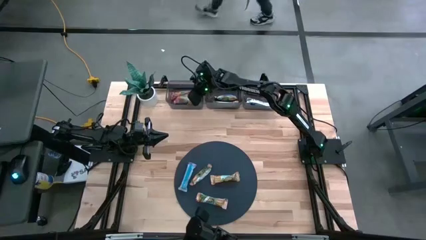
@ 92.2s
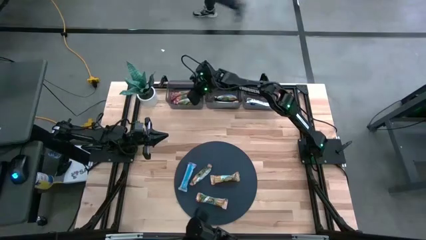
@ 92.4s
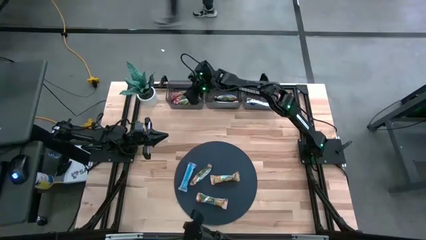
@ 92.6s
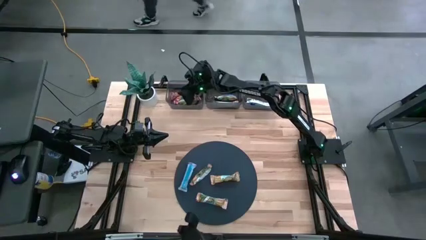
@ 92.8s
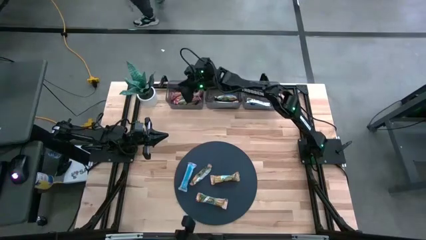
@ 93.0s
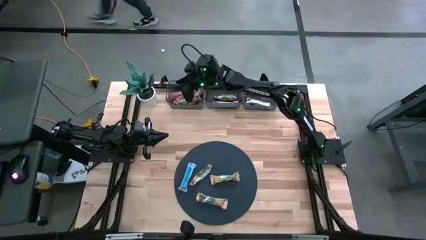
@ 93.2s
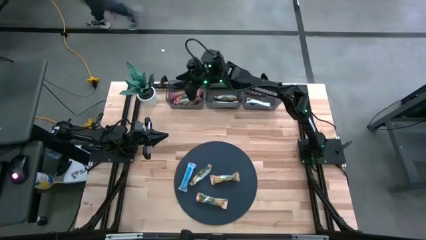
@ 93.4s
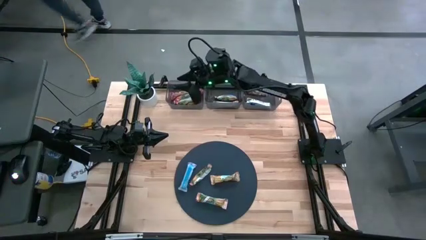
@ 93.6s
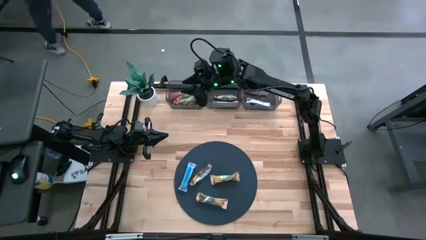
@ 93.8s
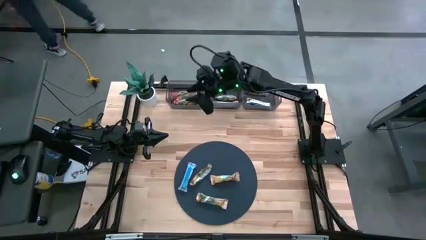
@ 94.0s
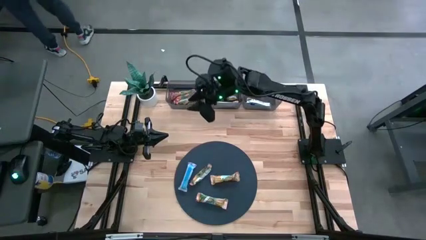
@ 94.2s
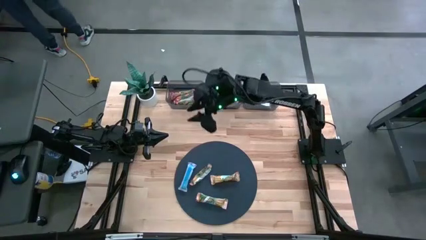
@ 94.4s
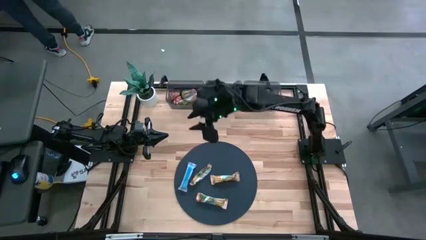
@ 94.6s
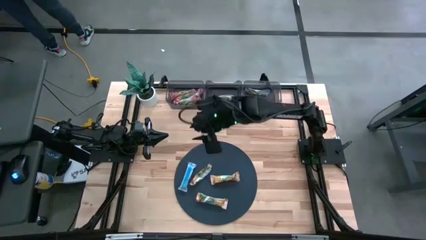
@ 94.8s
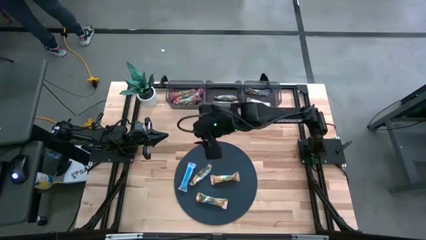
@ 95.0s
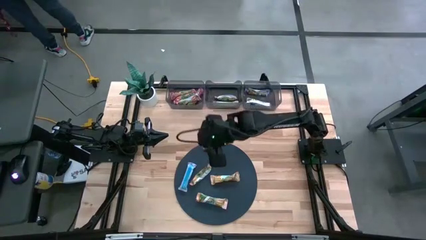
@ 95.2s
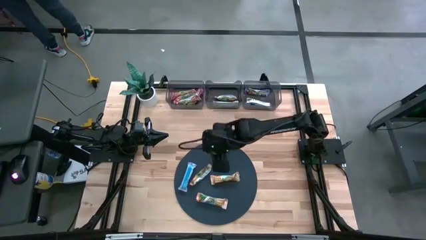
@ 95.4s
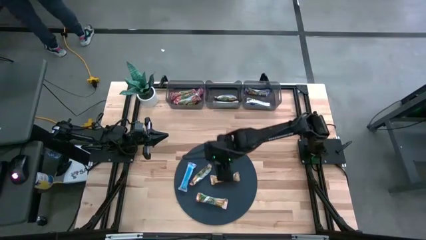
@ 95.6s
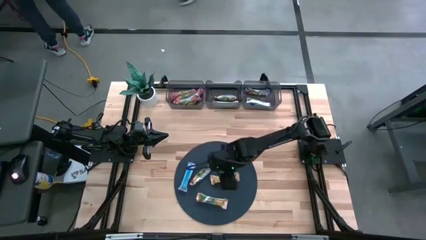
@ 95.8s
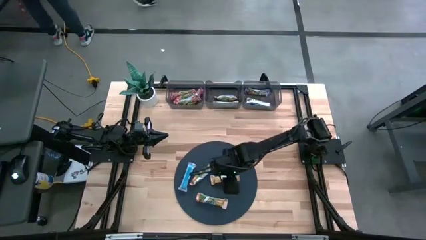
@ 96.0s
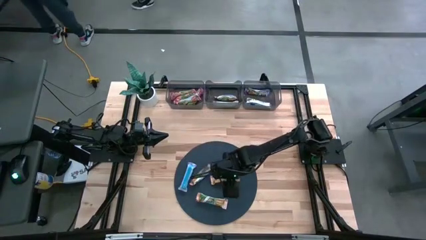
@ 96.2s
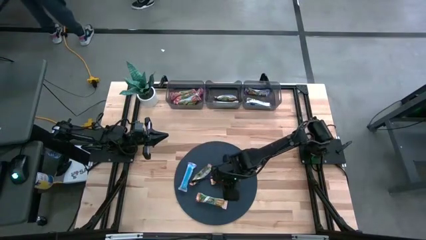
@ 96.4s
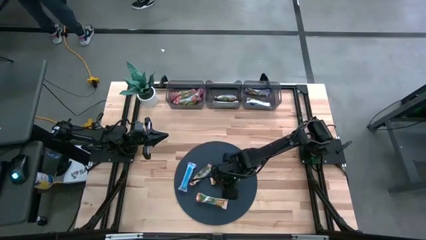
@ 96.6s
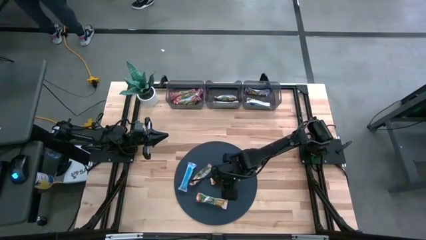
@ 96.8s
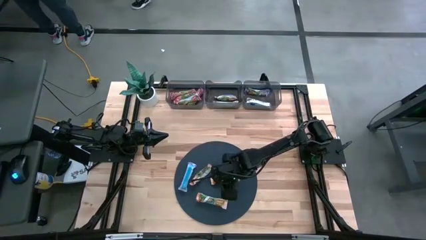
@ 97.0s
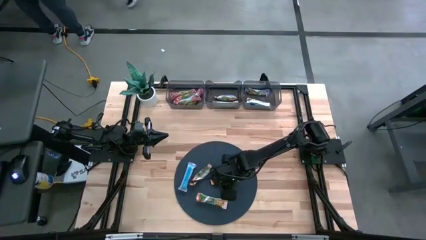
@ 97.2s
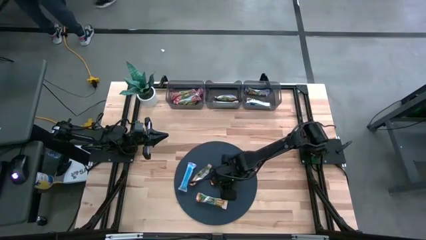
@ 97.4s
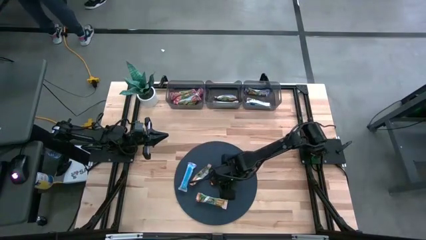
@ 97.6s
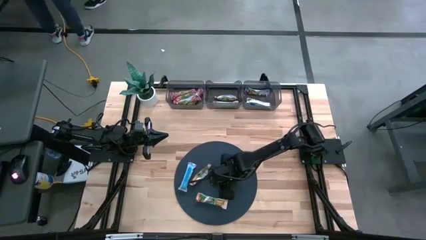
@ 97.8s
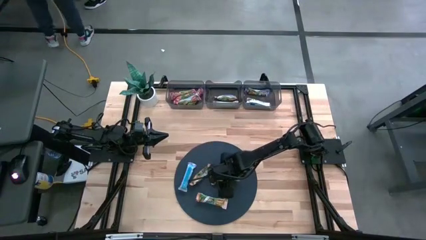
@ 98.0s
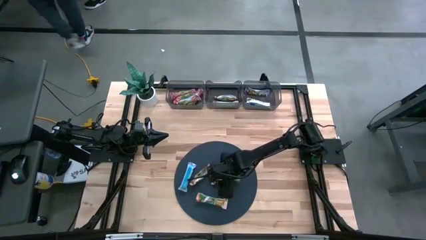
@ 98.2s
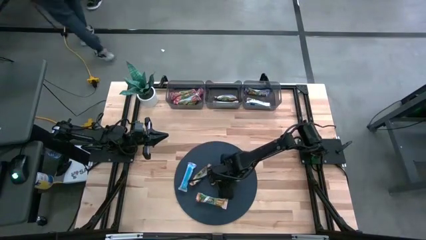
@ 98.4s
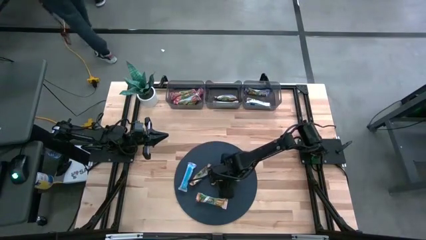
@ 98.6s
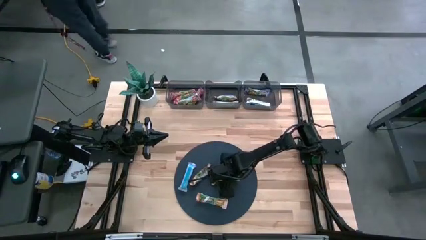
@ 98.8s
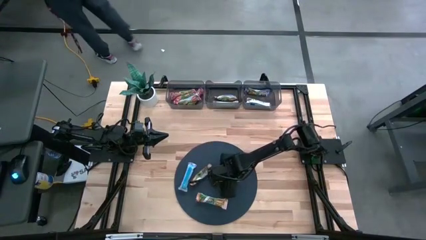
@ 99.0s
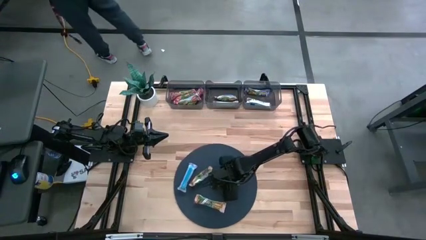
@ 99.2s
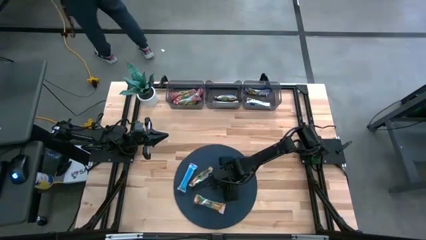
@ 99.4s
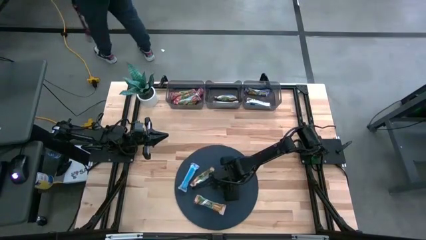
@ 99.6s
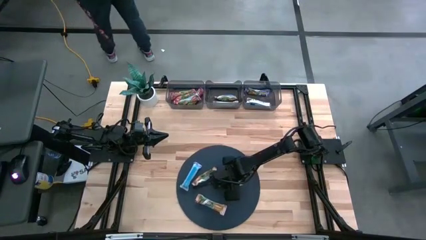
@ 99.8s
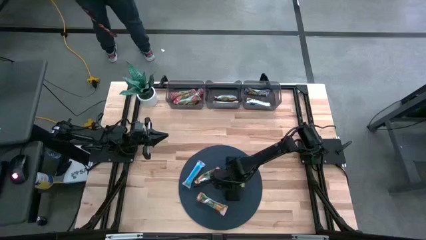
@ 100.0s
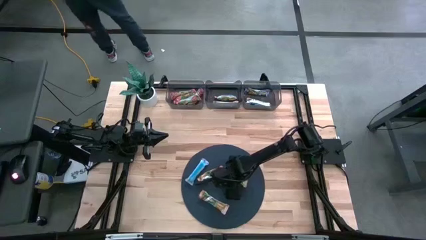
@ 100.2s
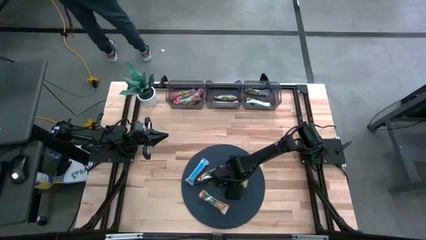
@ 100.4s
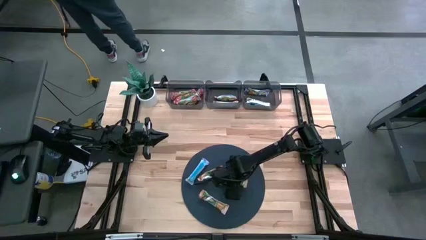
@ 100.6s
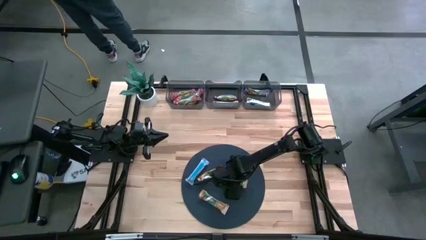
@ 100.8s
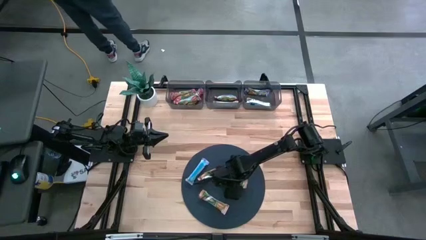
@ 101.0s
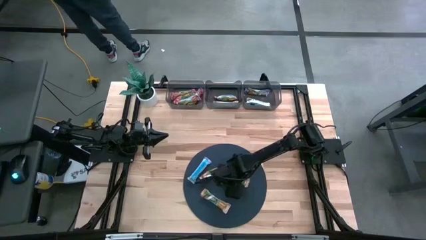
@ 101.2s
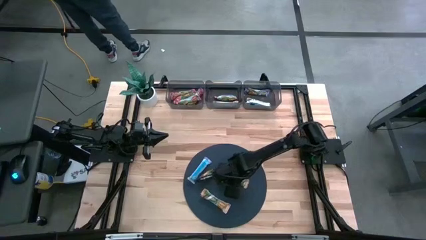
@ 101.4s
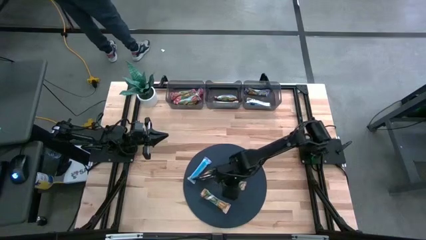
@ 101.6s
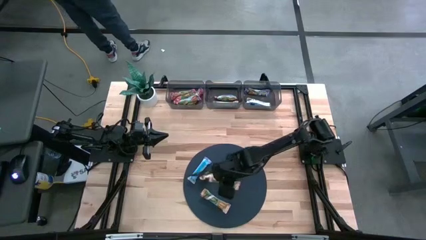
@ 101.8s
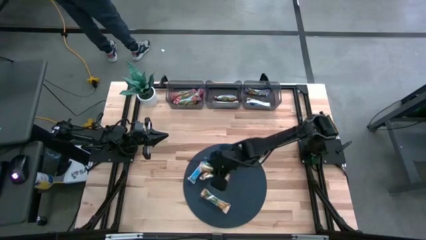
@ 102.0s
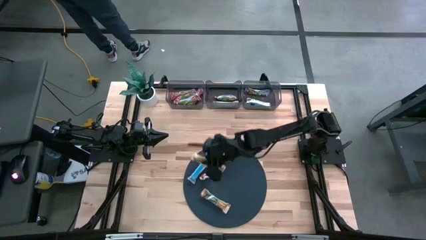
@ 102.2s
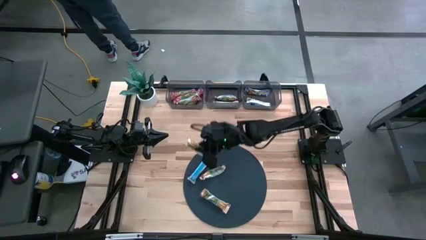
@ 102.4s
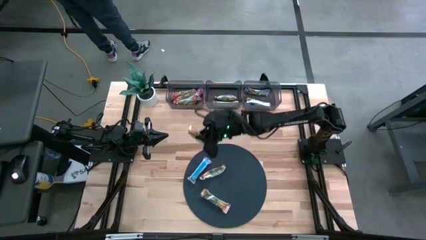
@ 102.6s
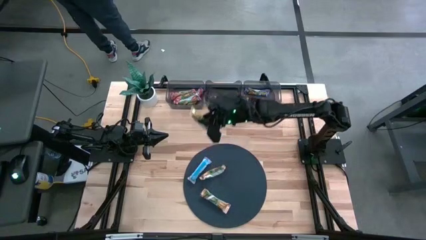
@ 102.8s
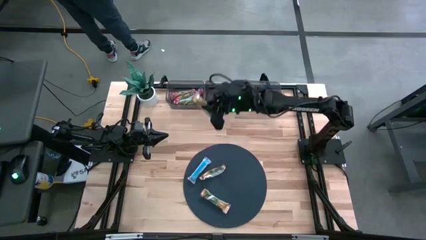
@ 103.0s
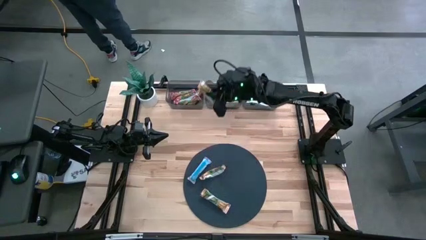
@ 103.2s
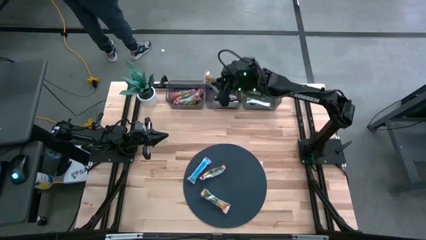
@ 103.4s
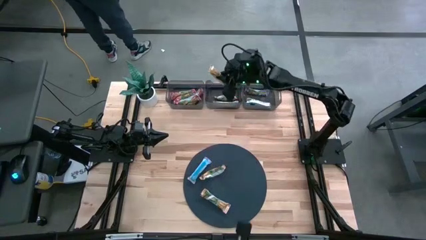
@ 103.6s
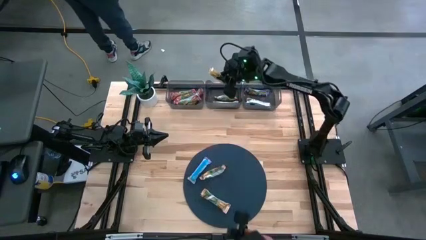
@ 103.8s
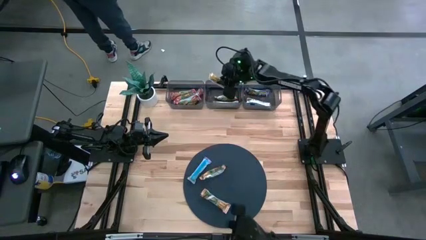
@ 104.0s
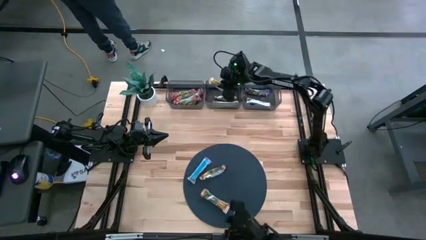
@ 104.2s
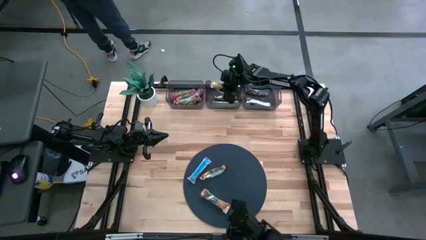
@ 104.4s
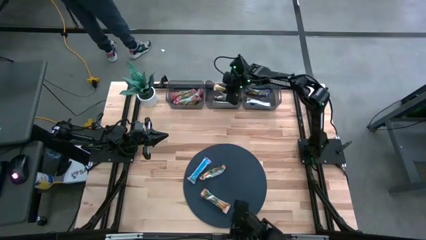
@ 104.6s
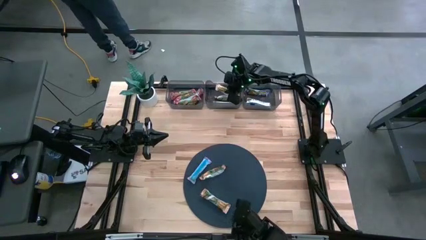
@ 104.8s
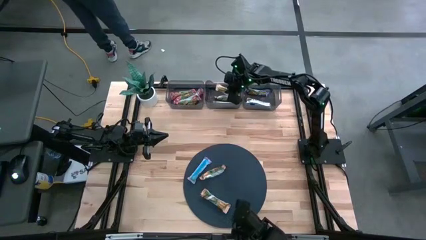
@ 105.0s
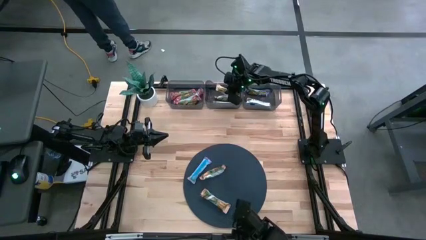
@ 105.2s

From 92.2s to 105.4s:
Task: Pick and place Granola Bars by type
Put the yellow granola bar into the middle black bin

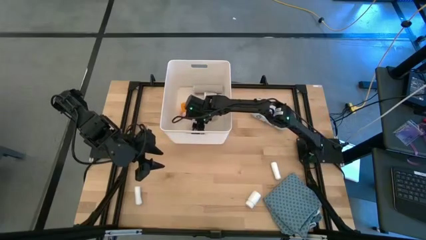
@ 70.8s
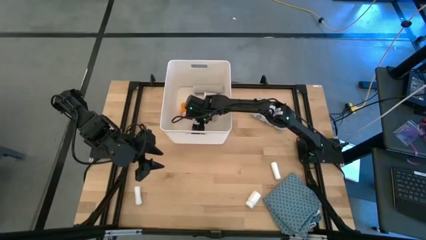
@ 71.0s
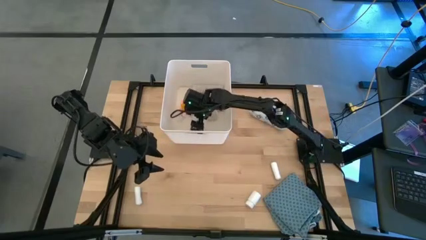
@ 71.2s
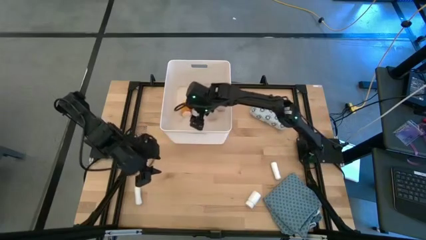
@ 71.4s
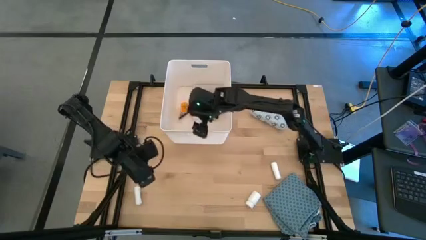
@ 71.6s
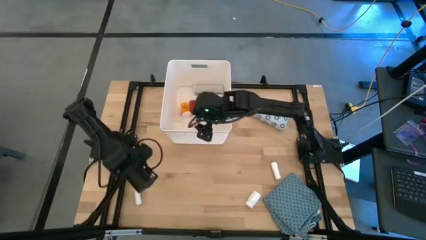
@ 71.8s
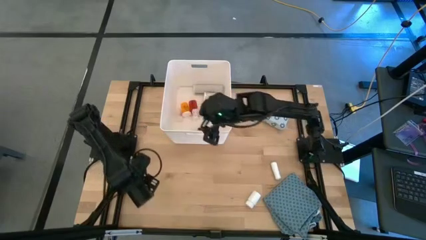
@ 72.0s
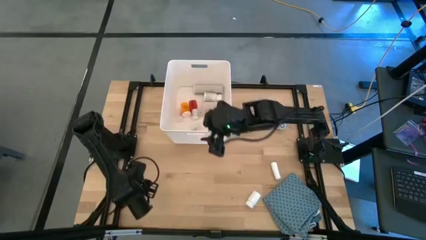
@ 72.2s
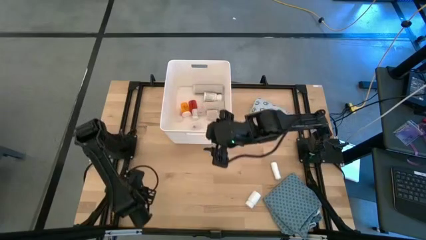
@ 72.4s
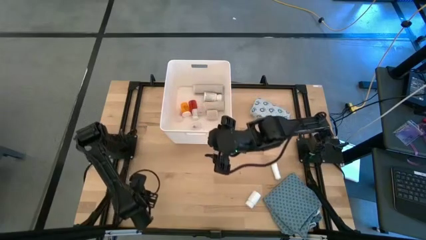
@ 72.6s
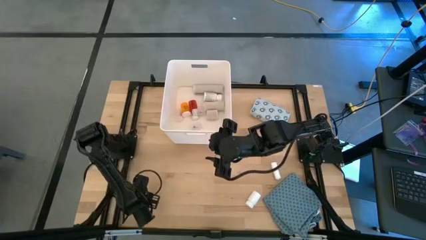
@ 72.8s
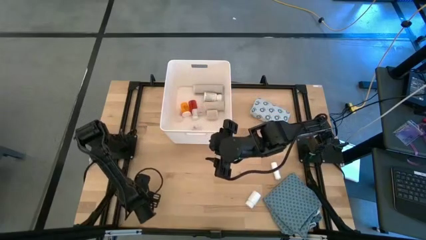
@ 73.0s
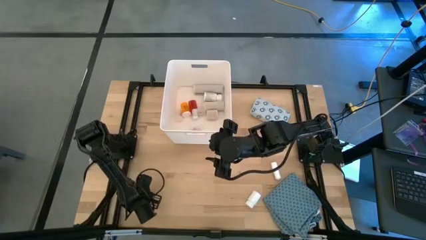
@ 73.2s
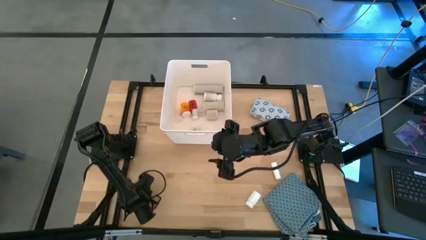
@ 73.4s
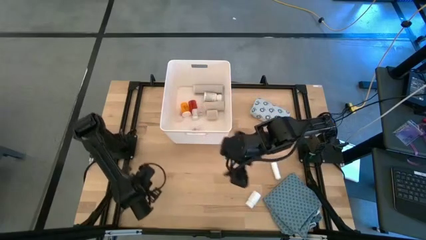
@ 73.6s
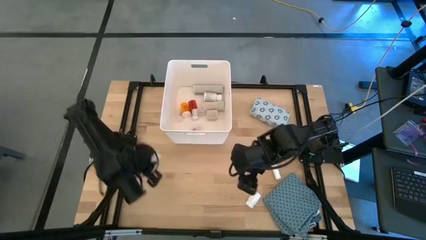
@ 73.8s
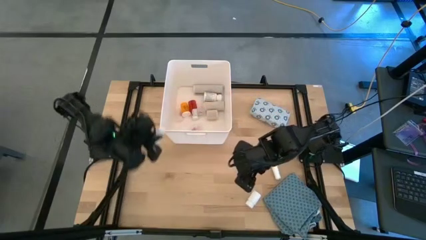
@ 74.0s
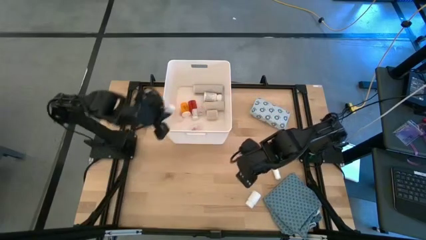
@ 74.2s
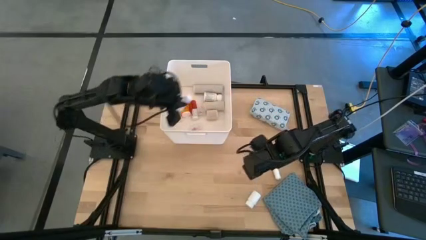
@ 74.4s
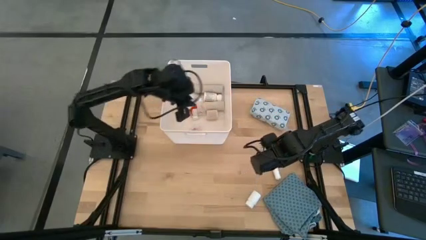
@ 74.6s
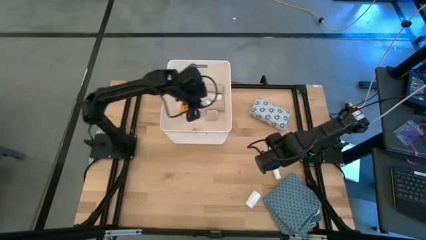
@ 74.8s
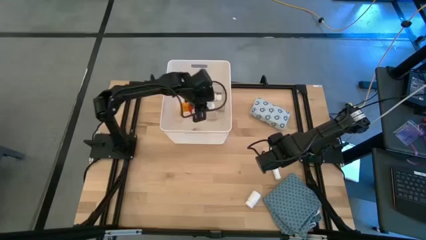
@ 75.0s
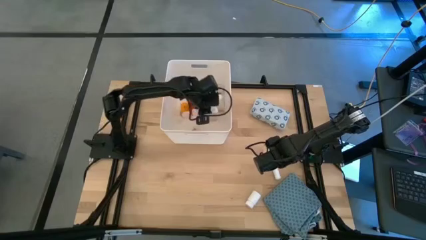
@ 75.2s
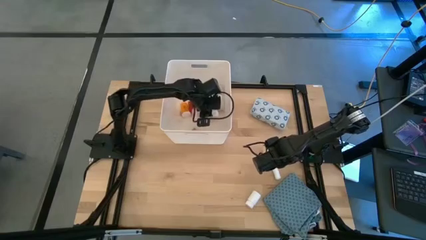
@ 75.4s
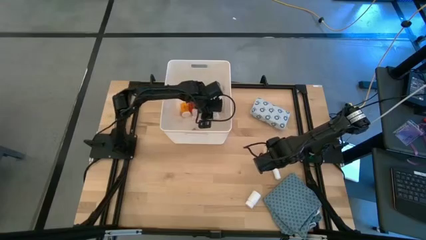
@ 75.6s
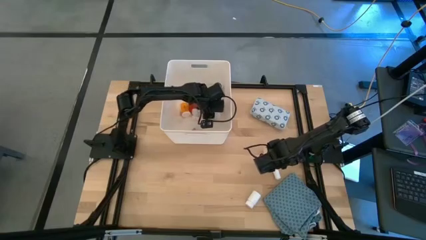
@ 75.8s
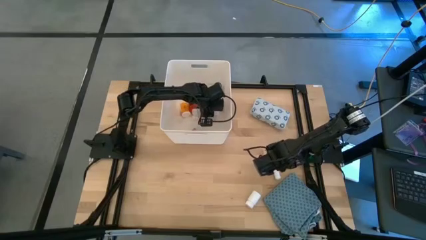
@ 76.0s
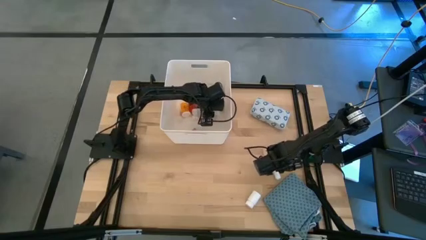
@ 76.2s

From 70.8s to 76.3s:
Task: Pick & place medical supplies in basket/bin
Put the bottom white gauze into the white bin
